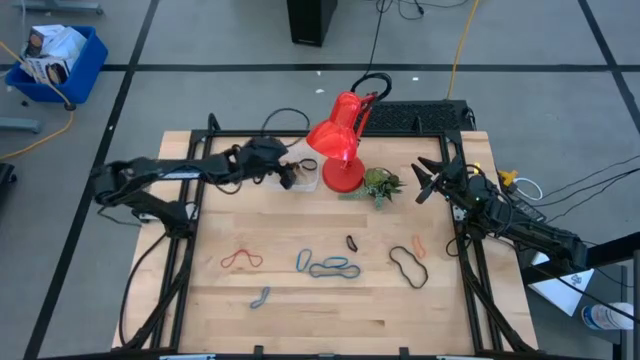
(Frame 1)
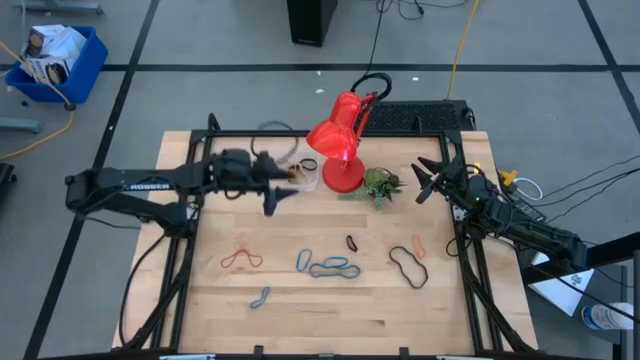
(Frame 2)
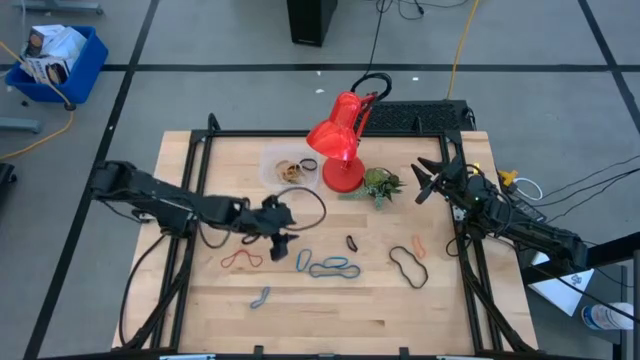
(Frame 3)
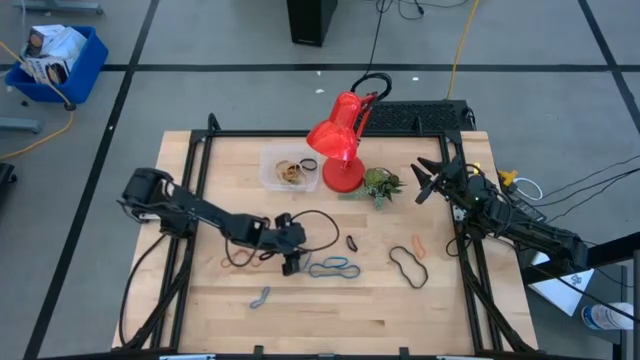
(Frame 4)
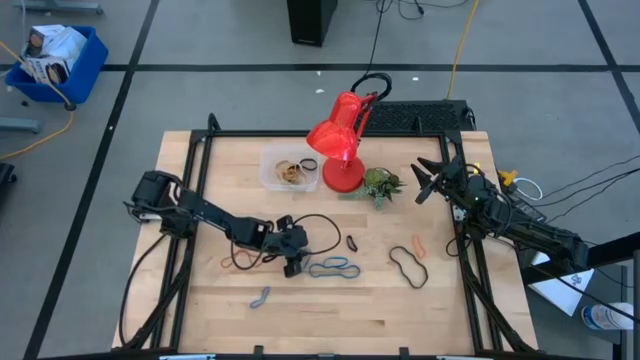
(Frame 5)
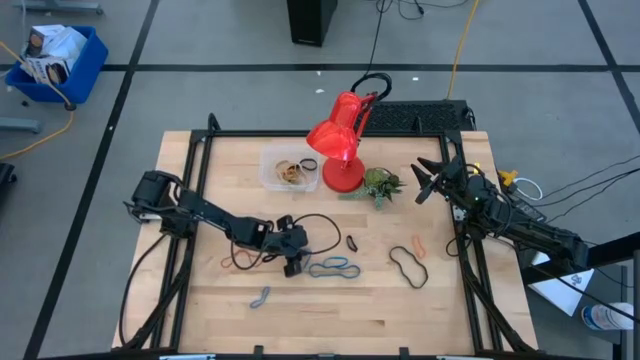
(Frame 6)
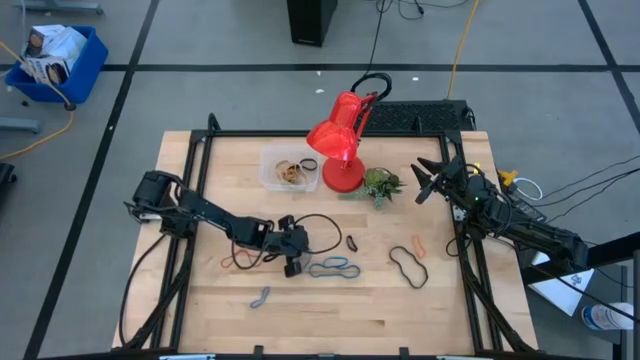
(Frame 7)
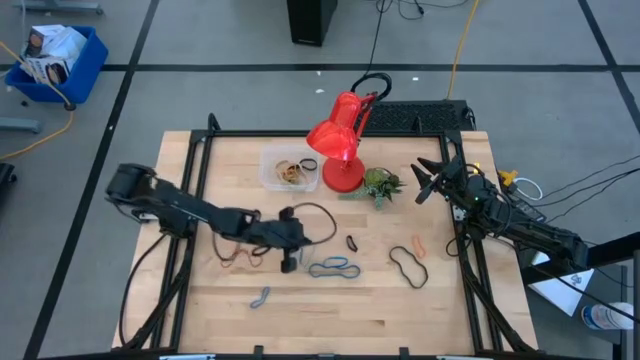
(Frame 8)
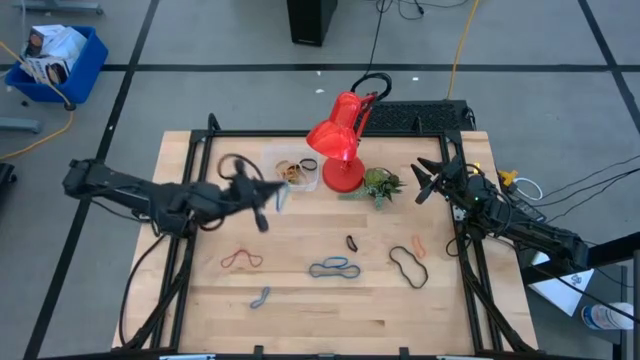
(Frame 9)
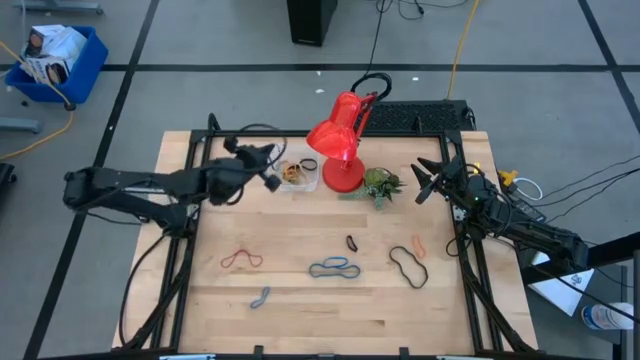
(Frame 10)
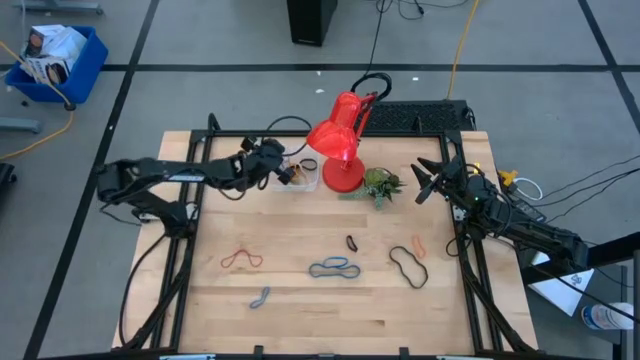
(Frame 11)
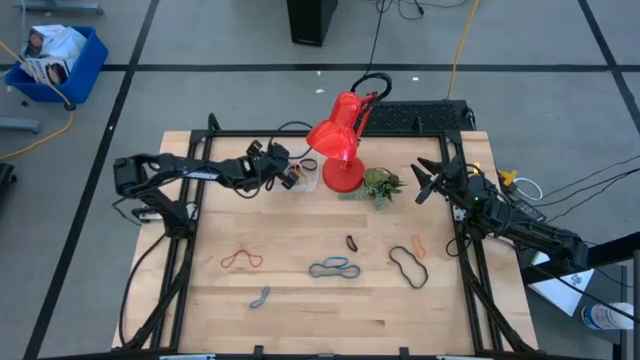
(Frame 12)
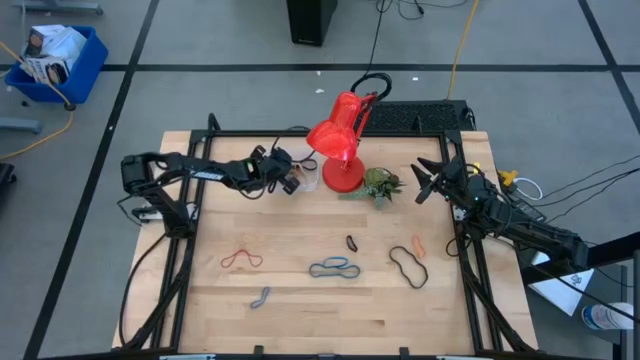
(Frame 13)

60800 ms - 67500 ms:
Task: Pick and place rubber bands into bin
Put the blue rubber band into the transparent bin

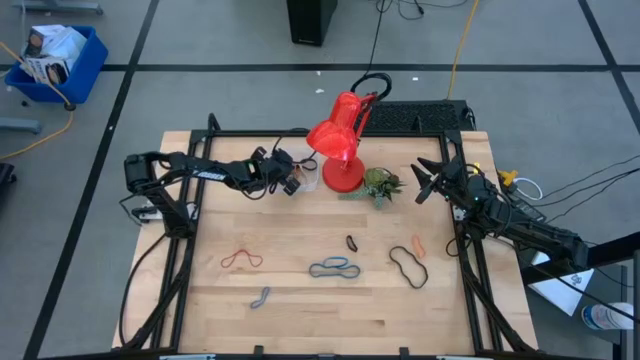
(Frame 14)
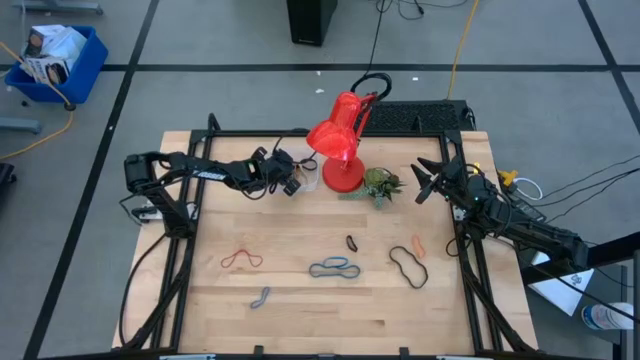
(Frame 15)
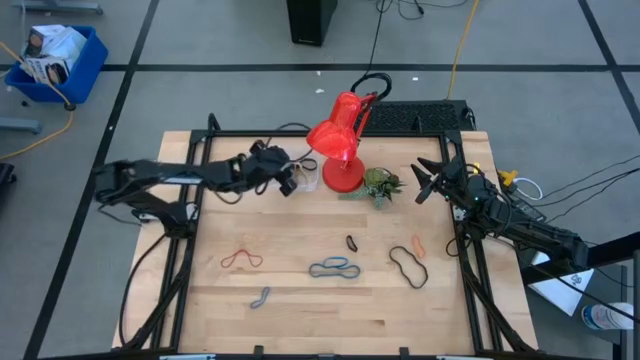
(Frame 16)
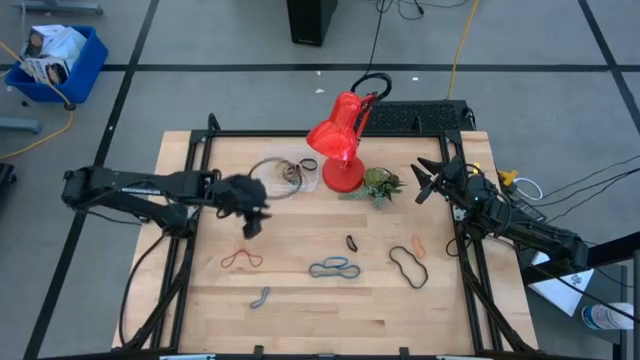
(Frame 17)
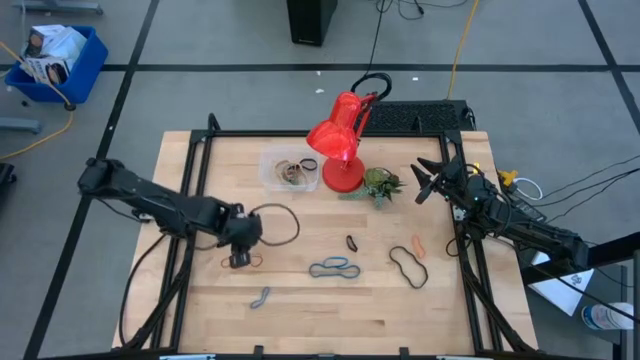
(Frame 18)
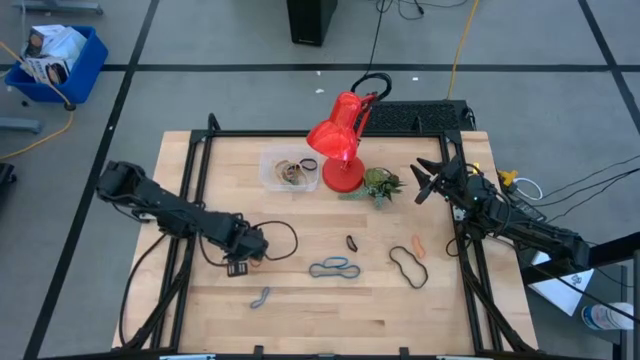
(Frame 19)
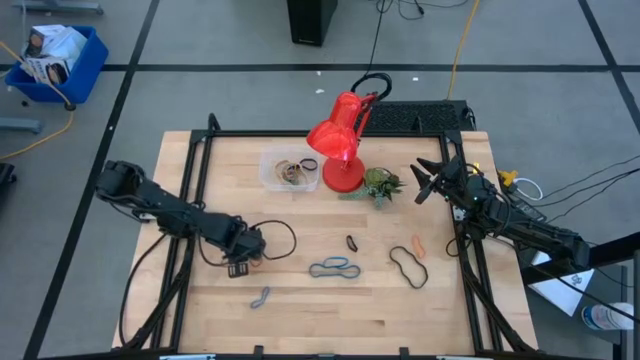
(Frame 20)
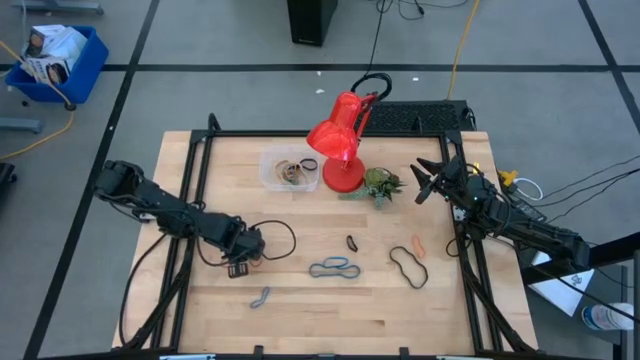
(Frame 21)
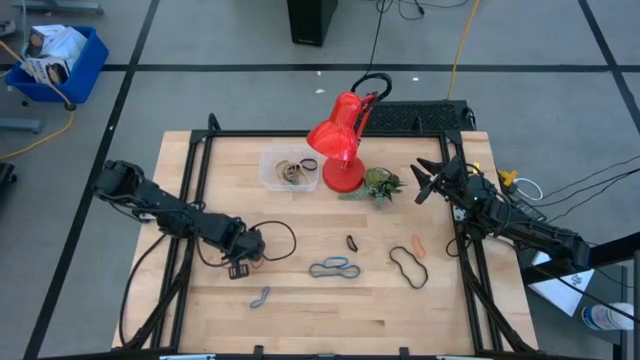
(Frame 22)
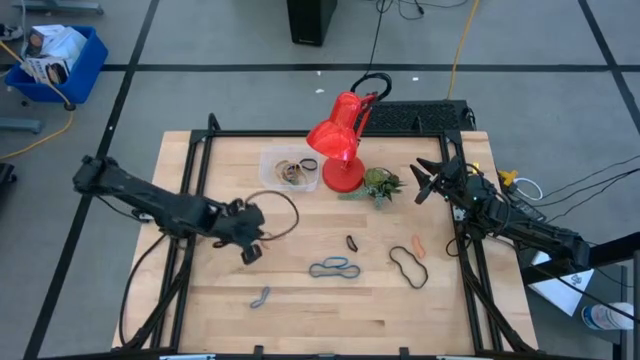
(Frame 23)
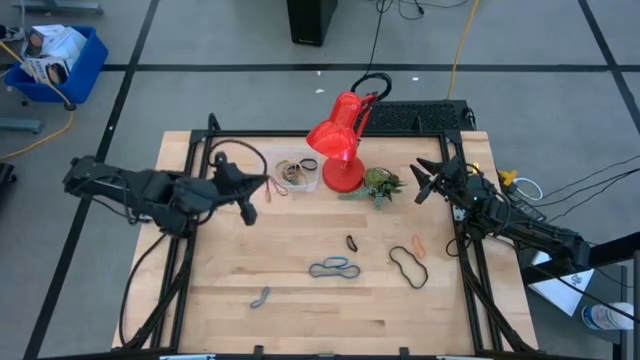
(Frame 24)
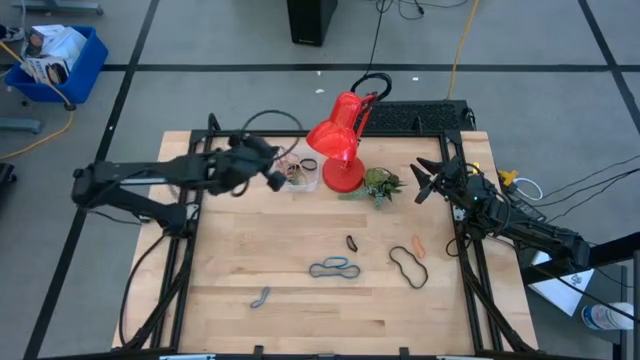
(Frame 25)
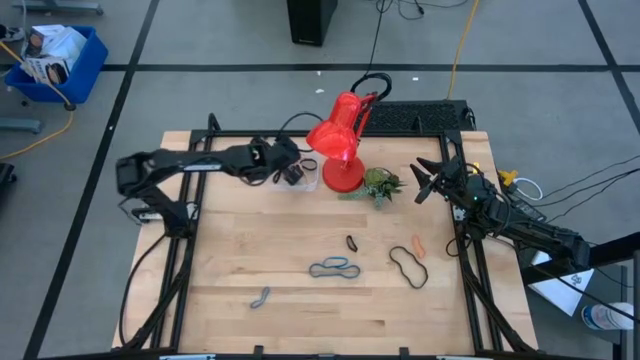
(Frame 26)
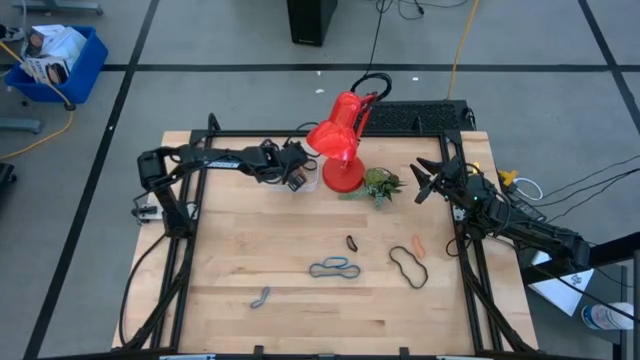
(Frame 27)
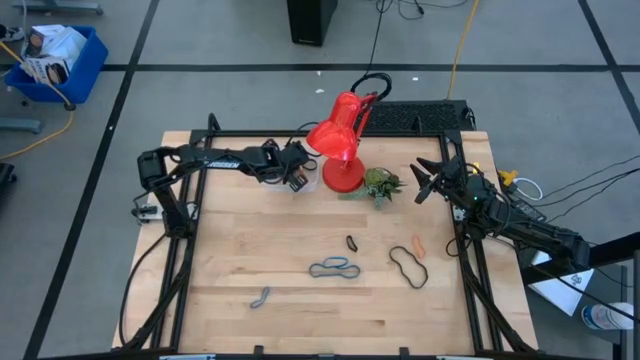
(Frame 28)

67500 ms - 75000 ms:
Put the red rubber band into the transparent bin

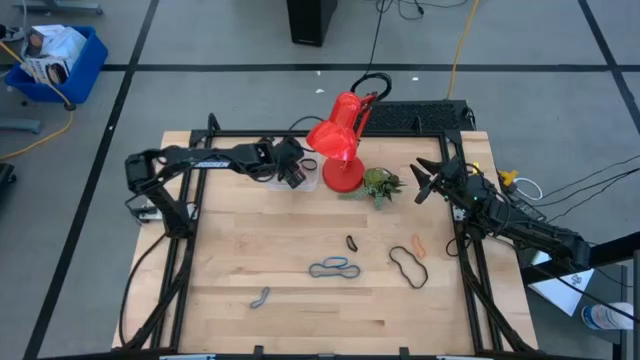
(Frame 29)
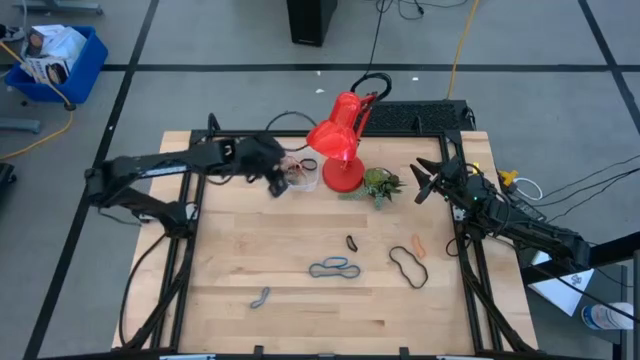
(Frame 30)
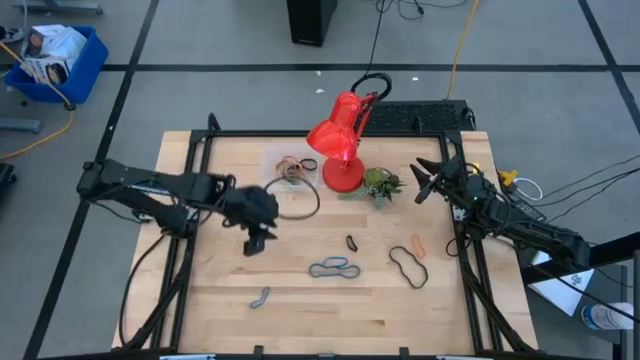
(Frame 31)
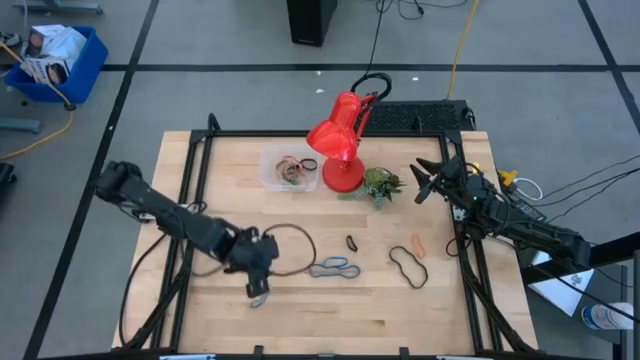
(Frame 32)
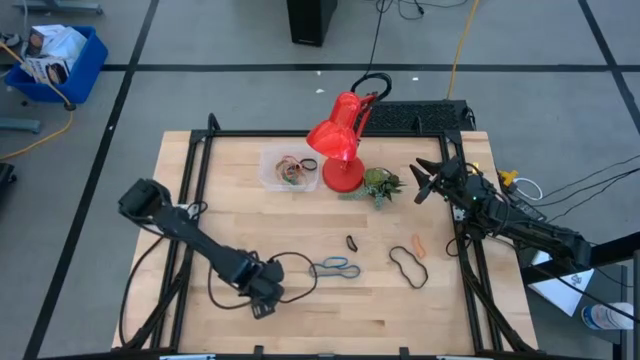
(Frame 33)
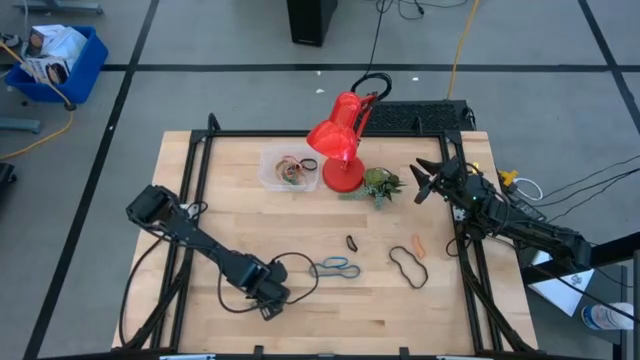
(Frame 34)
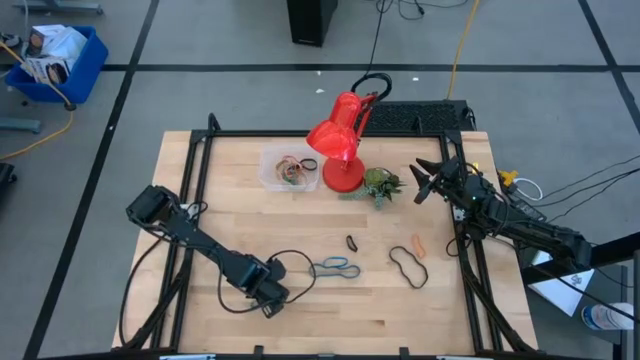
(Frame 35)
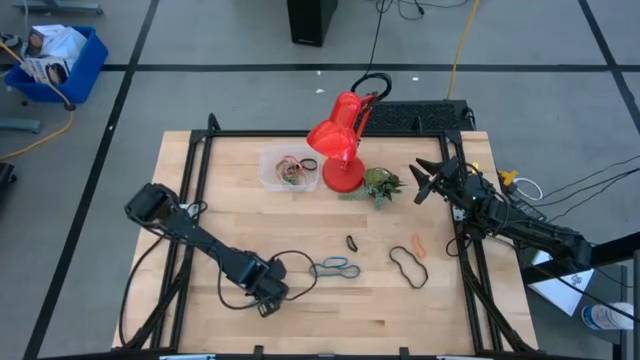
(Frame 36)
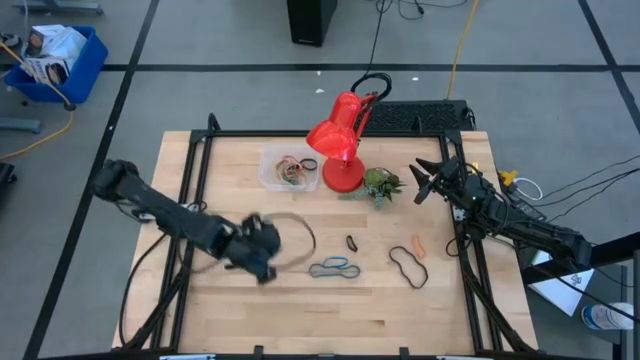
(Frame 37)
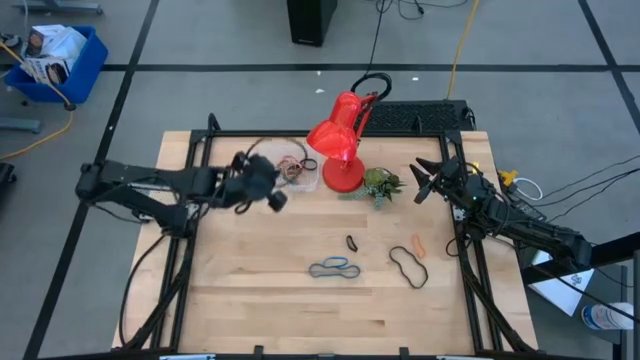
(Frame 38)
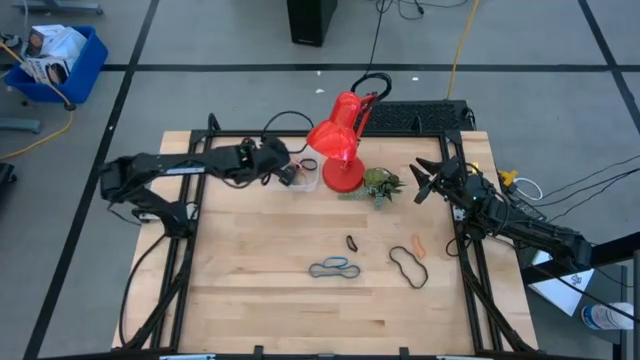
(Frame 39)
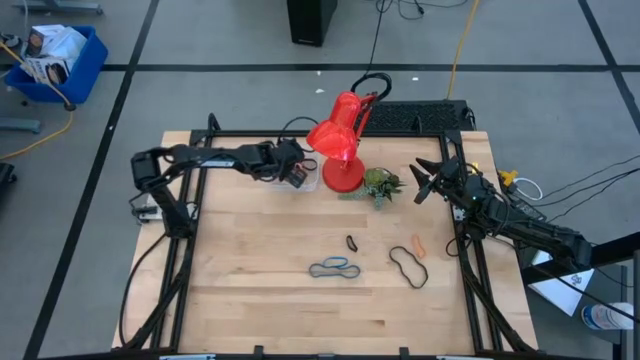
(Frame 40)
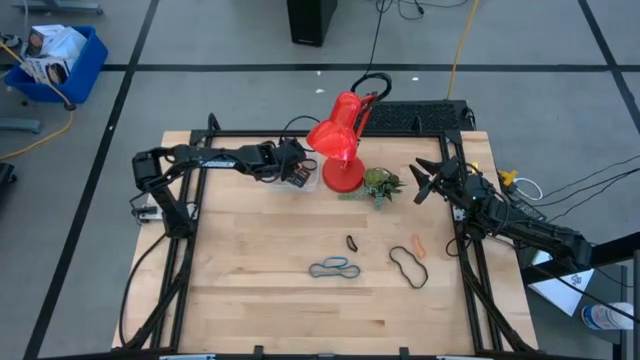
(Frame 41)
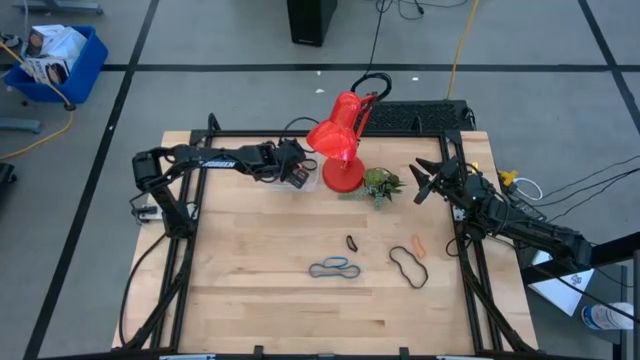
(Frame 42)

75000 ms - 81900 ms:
Put the bottom blue rubber band into the transparent bin

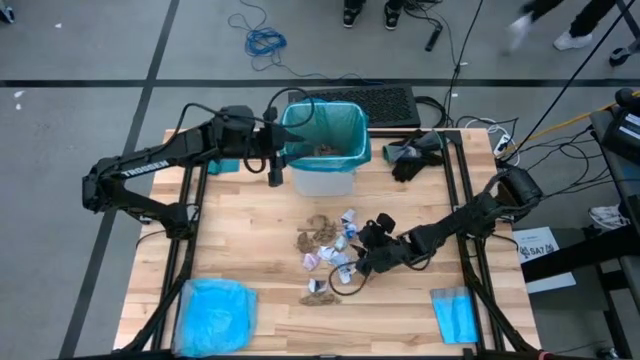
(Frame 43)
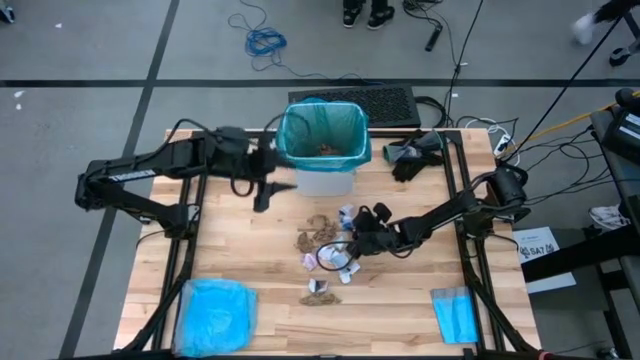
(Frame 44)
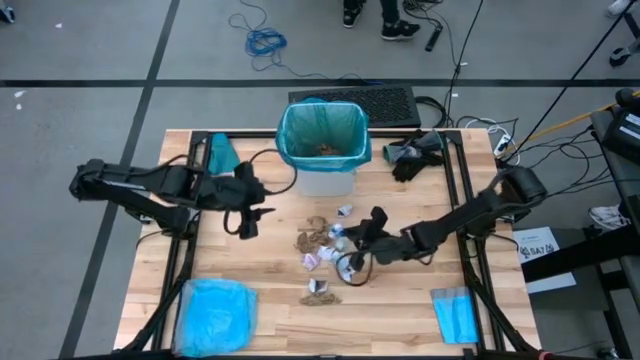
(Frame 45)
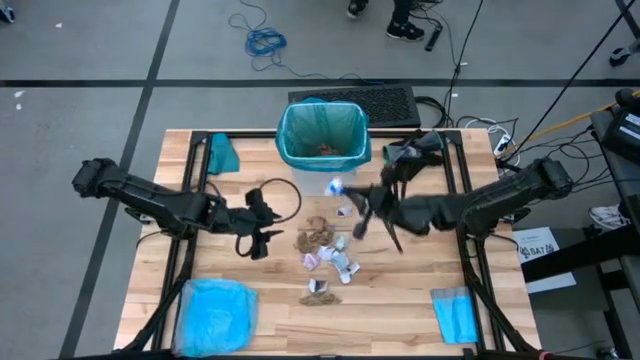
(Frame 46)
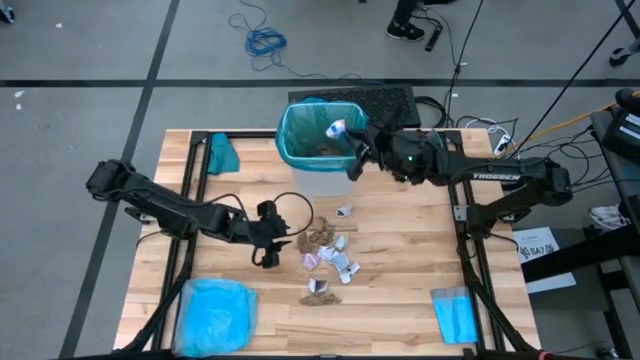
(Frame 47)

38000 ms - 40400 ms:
Task: place trash/remove bag and relplace
Put the blue trash bag into the trash bin
